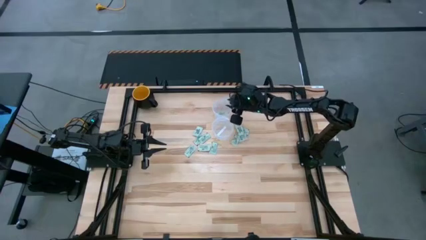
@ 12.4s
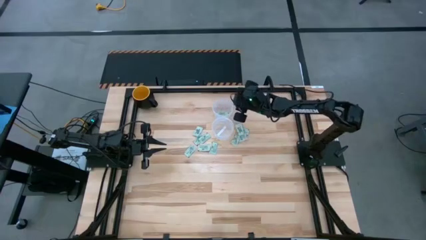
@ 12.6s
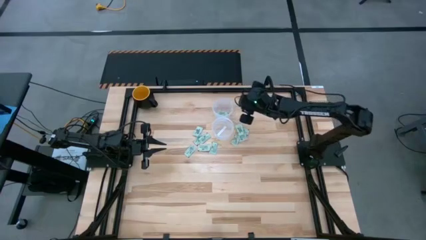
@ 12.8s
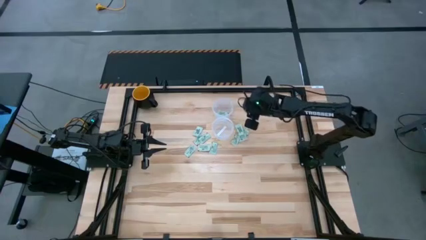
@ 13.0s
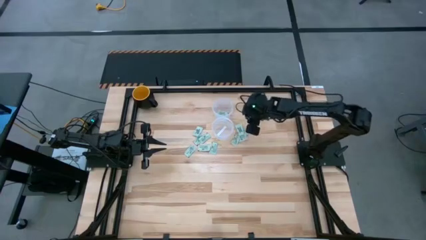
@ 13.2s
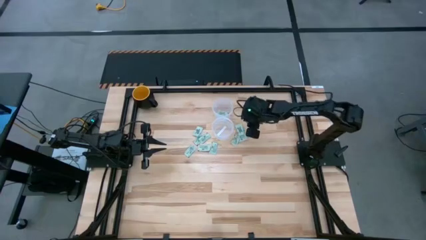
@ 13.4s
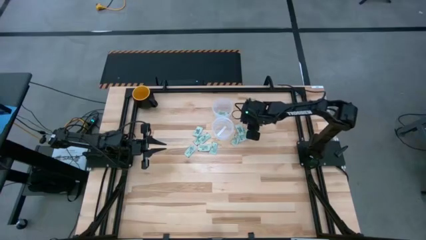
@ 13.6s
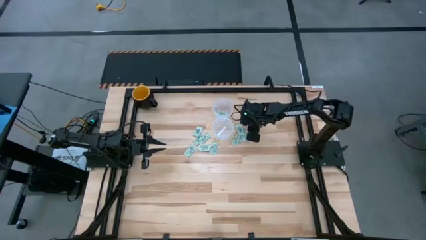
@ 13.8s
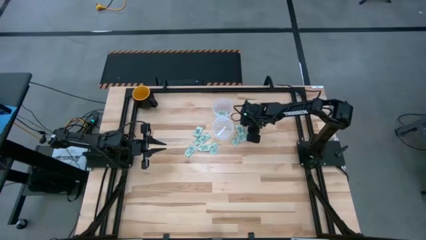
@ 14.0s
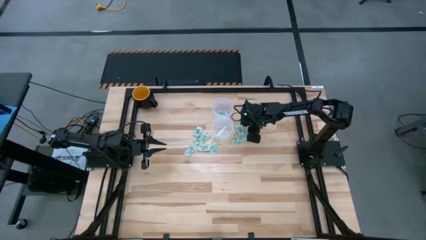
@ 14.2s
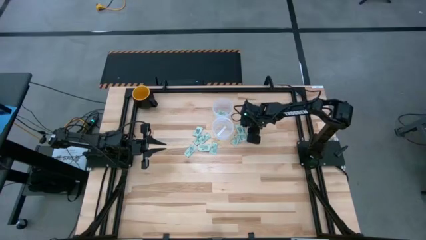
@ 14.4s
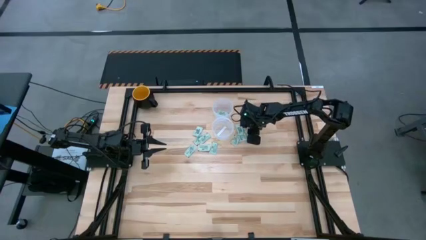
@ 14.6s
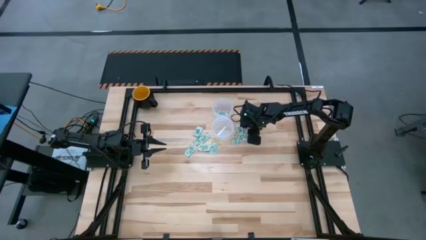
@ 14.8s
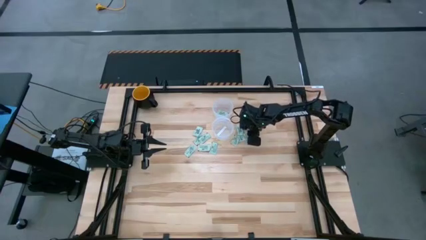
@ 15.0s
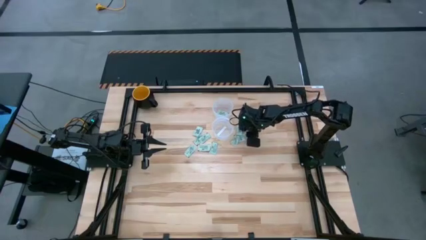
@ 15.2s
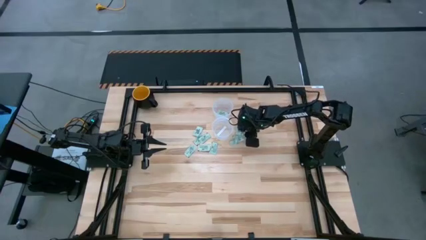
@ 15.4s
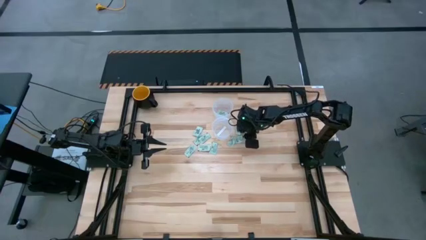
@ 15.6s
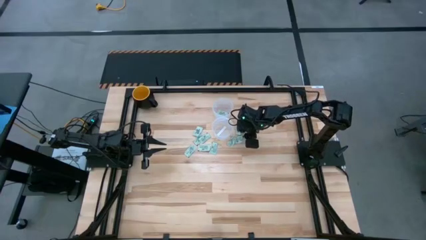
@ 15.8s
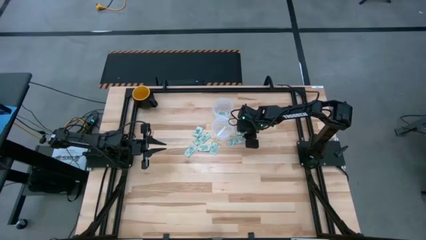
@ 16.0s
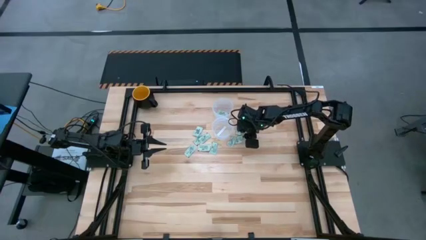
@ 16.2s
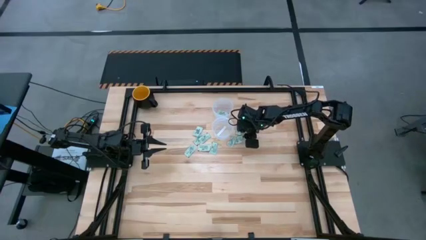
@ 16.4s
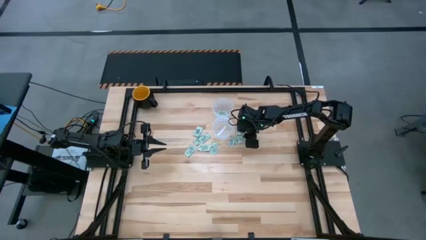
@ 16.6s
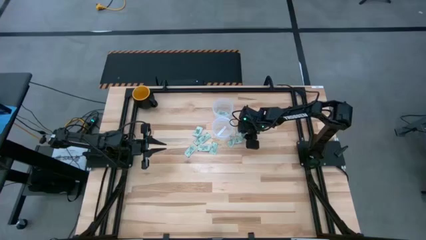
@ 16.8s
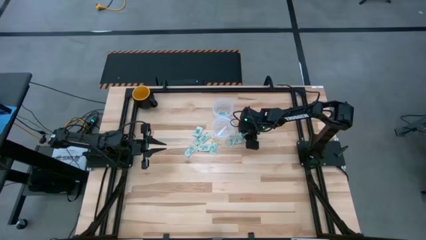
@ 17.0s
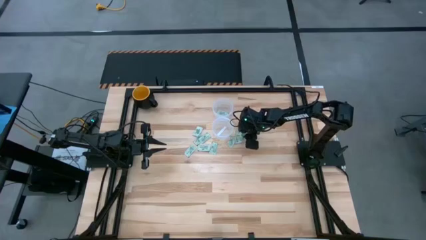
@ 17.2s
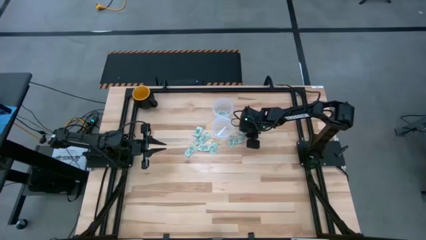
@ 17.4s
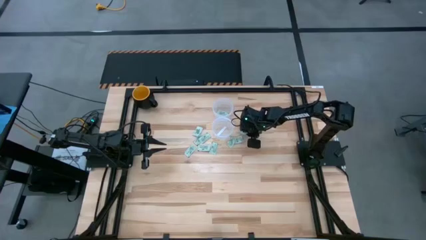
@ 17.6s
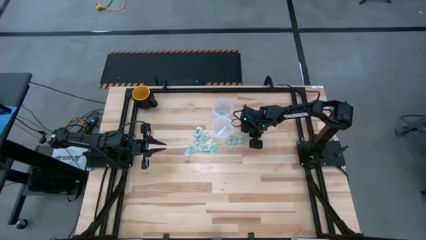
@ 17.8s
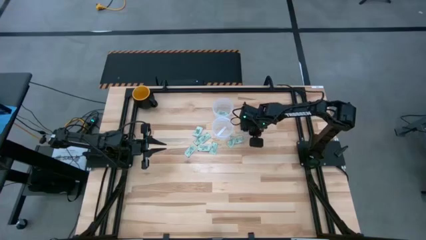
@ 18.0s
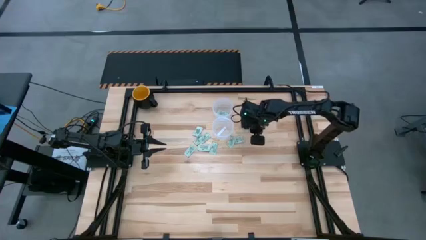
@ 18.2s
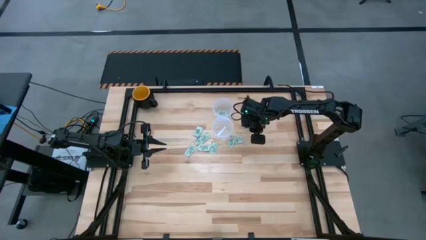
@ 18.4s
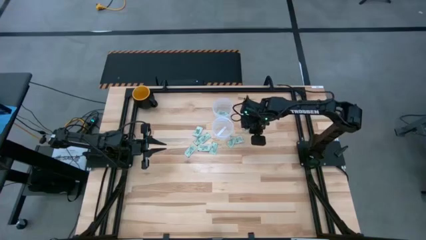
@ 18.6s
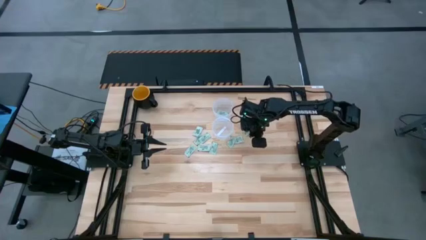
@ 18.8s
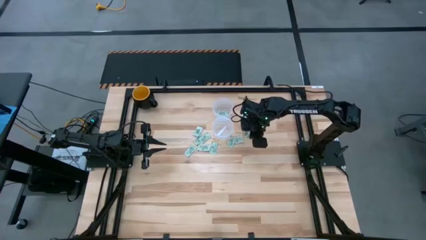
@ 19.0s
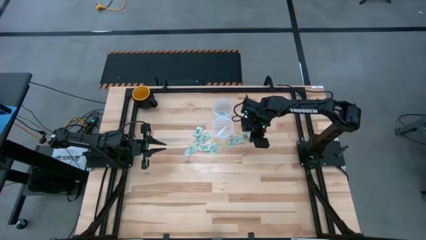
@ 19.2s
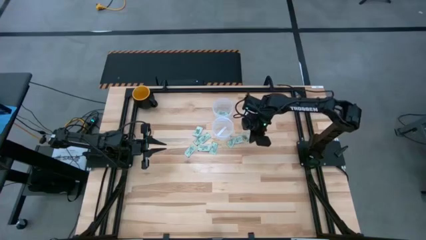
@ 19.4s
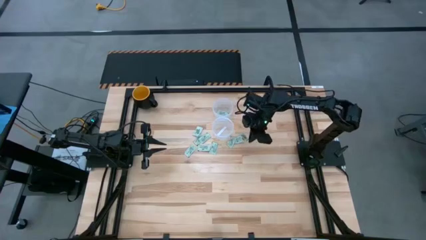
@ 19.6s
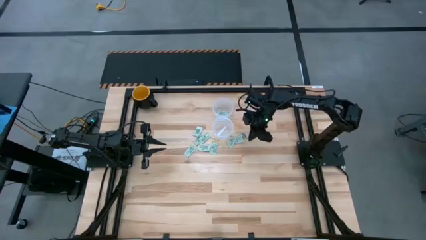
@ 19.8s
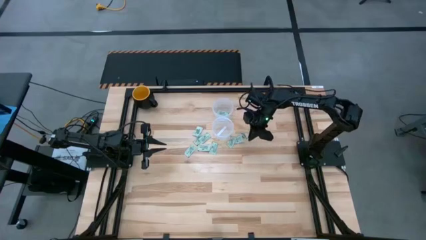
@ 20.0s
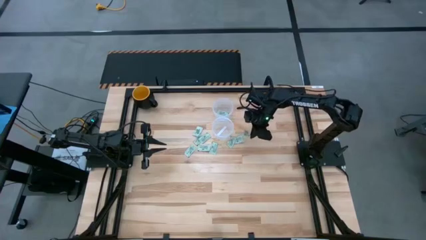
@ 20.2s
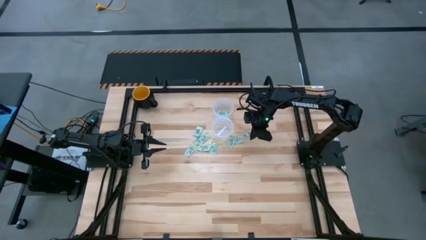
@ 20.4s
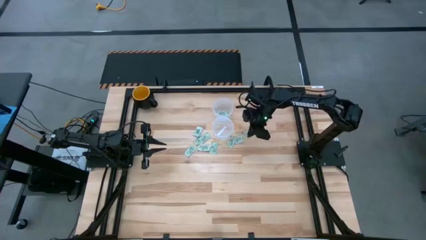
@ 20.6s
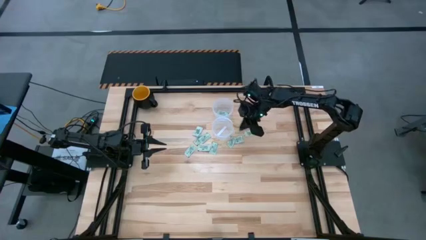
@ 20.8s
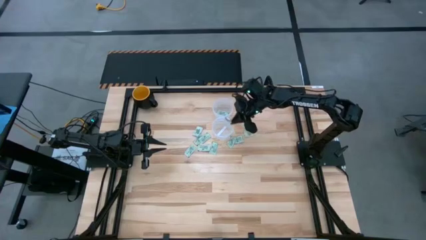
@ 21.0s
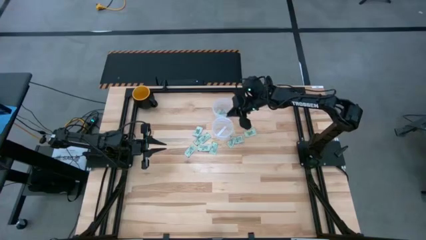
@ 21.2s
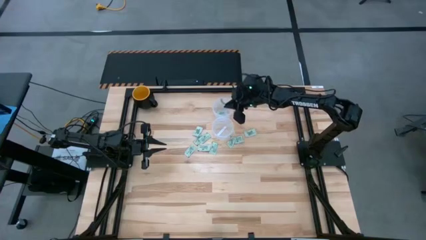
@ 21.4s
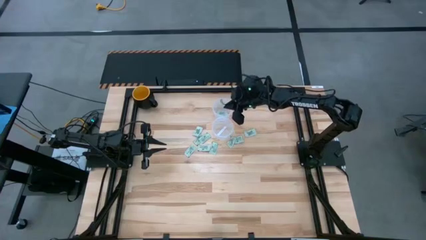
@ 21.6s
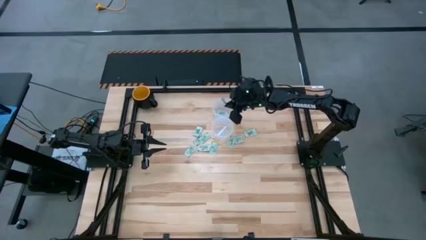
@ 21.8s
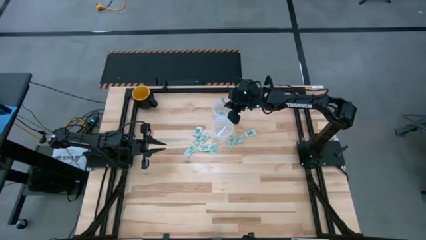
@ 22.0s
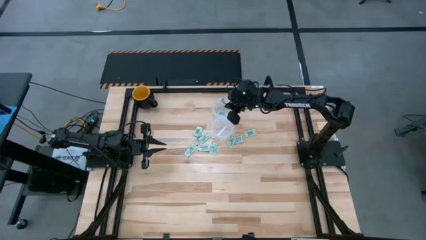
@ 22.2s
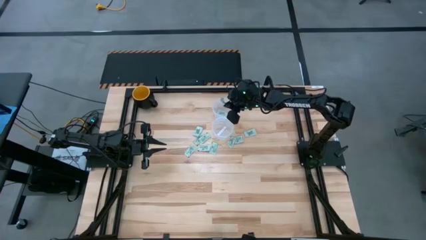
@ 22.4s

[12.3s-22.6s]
Task: Pick and place items into bin
Put the green stevia packet into the top transparent bin

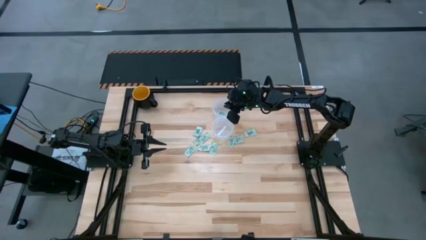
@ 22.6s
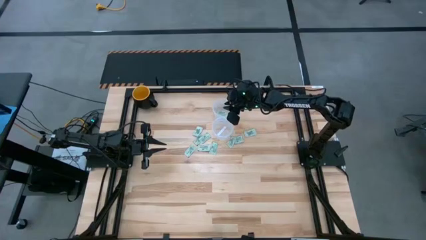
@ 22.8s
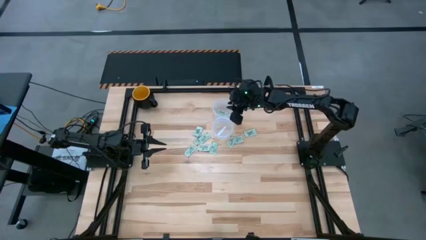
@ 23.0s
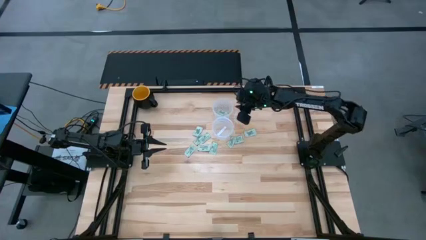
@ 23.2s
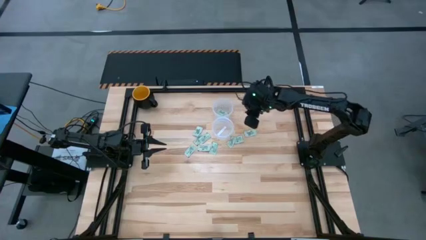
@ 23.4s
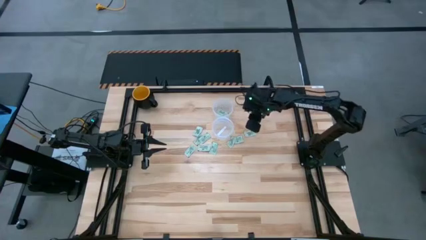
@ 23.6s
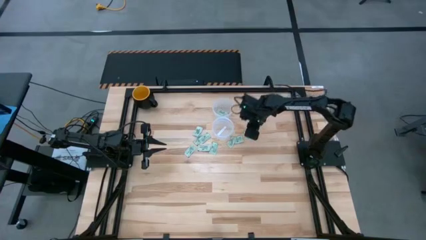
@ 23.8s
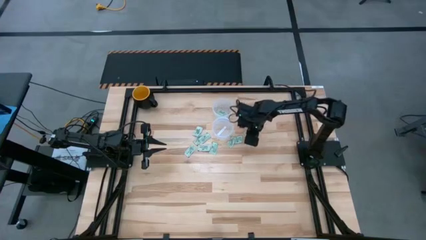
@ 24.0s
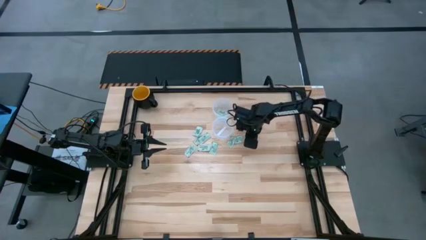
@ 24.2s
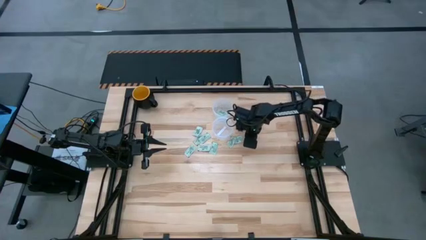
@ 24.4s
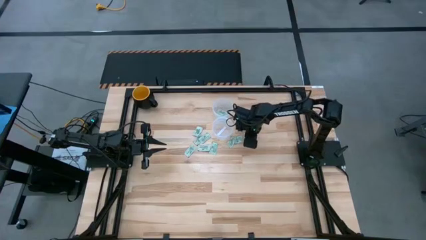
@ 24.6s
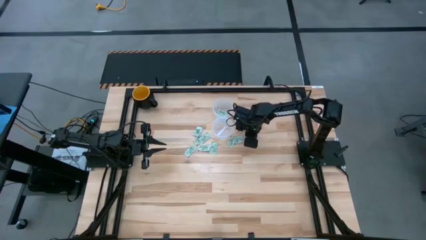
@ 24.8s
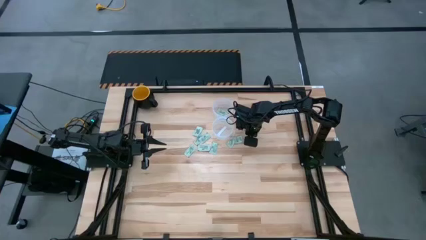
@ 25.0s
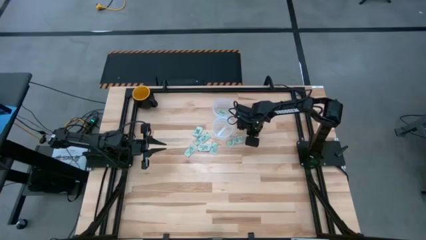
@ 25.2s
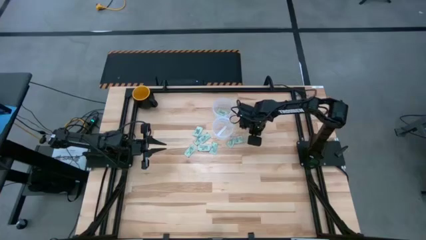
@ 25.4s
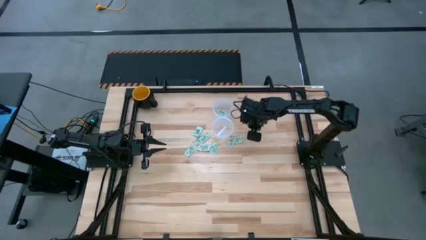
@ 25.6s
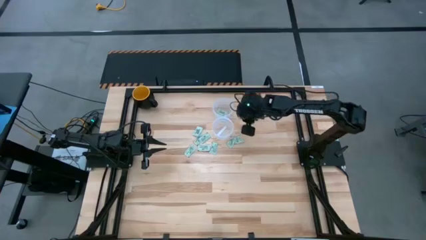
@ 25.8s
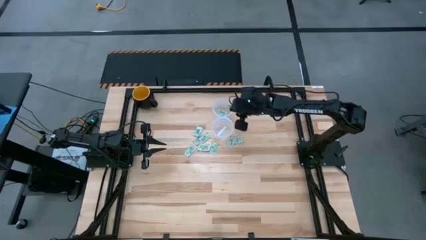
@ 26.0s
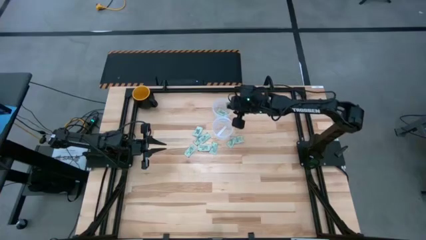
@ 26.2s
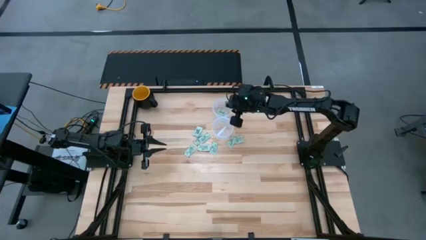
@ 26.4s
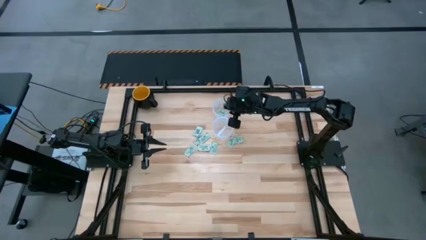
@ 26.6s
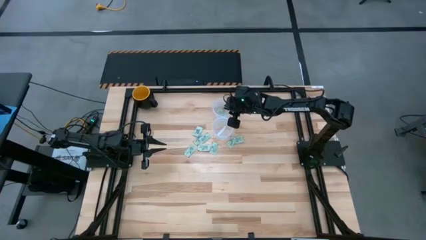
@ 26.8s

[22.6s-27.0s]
Put the green stevia packet into the top transparent bin
